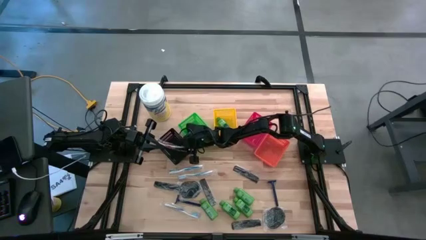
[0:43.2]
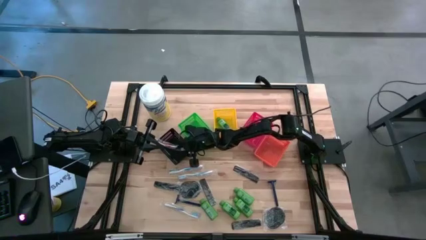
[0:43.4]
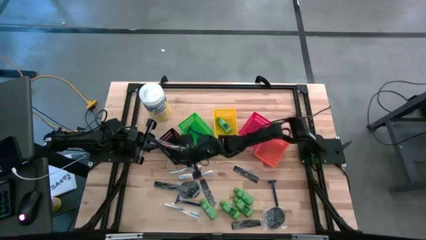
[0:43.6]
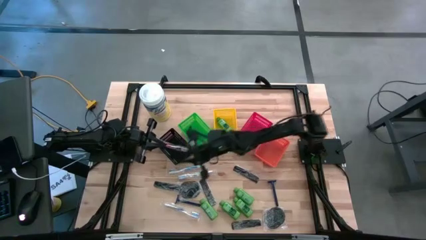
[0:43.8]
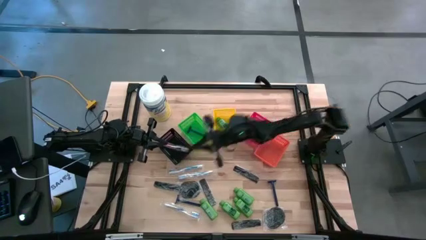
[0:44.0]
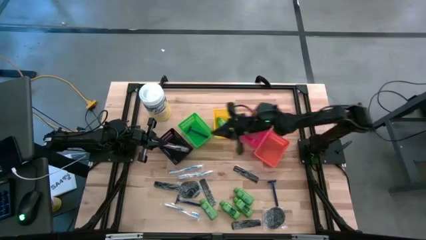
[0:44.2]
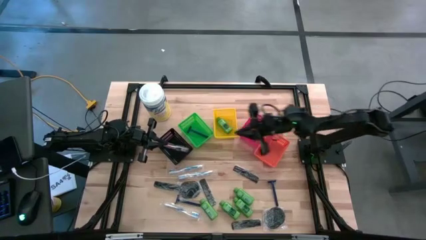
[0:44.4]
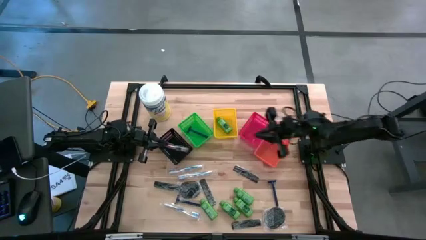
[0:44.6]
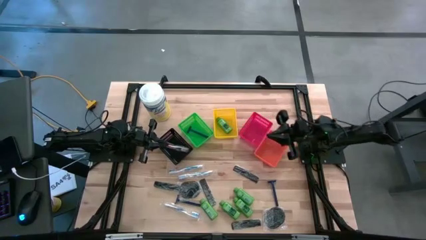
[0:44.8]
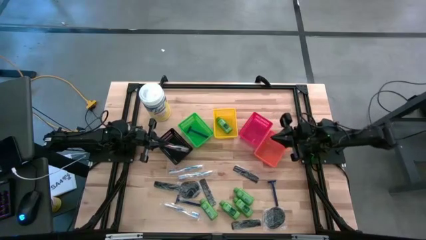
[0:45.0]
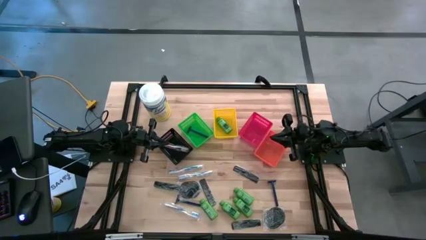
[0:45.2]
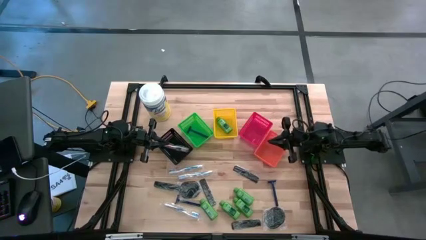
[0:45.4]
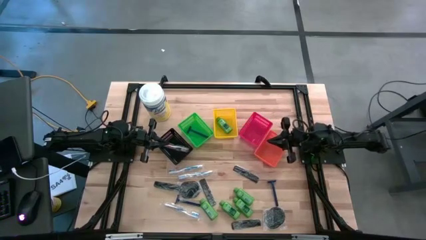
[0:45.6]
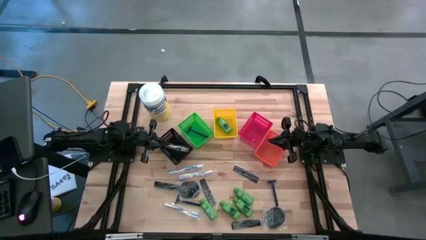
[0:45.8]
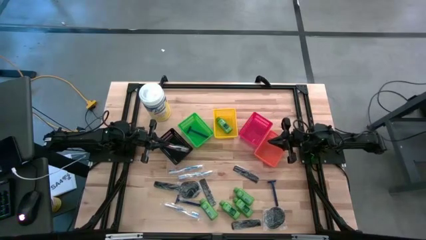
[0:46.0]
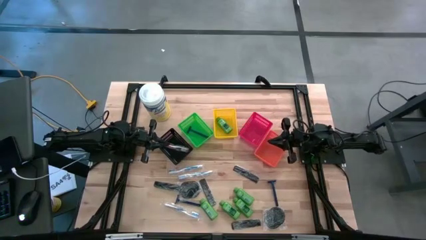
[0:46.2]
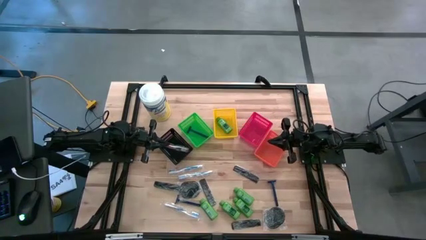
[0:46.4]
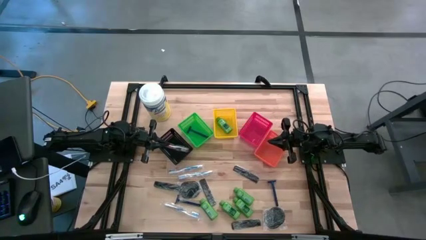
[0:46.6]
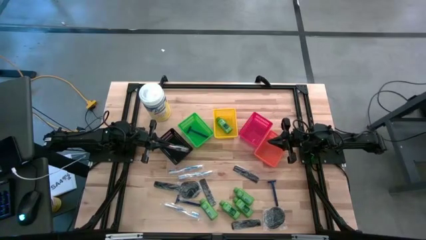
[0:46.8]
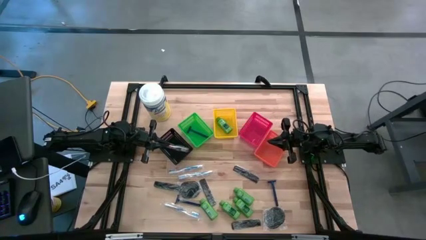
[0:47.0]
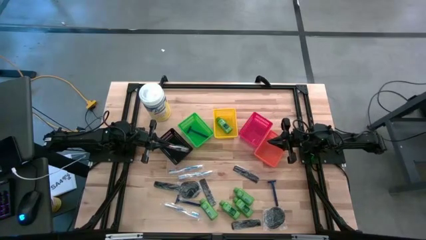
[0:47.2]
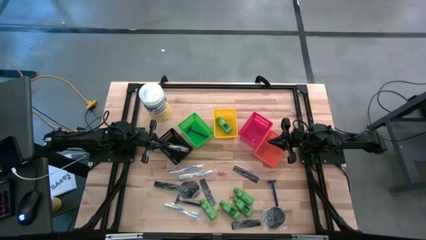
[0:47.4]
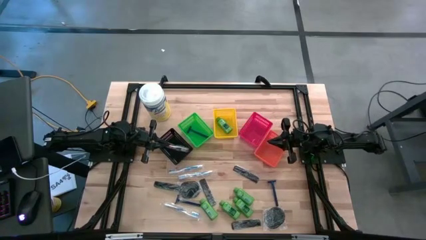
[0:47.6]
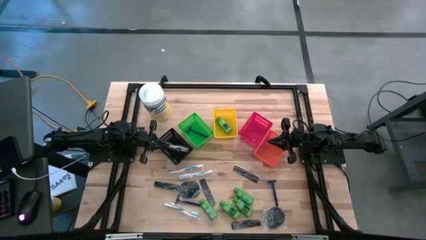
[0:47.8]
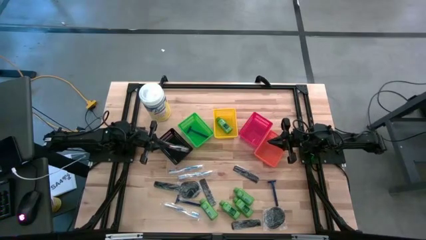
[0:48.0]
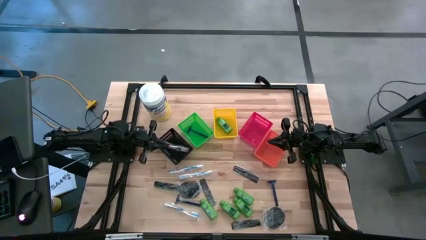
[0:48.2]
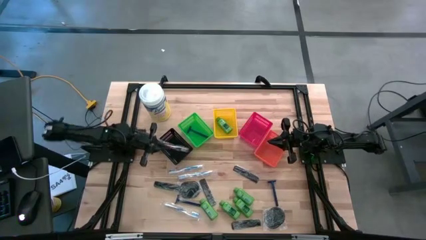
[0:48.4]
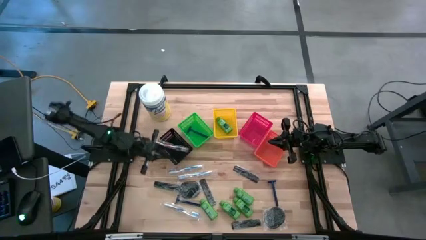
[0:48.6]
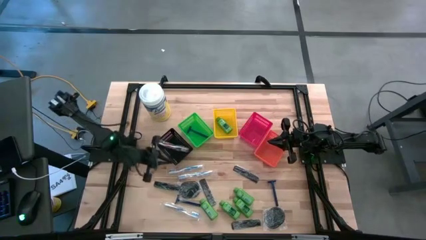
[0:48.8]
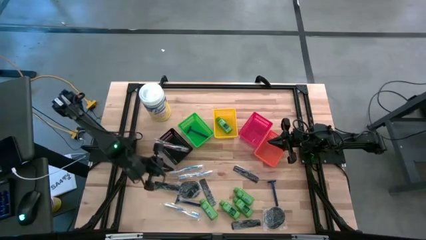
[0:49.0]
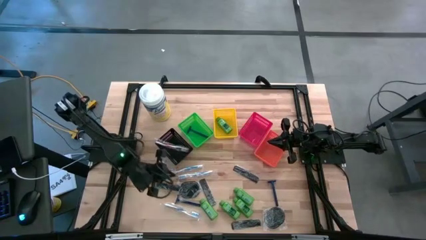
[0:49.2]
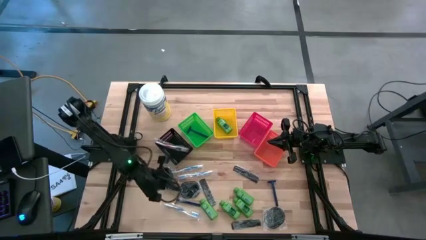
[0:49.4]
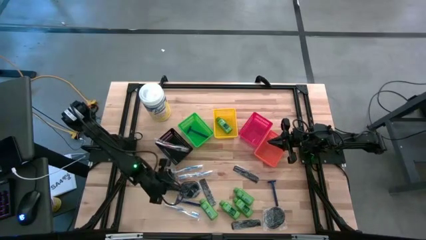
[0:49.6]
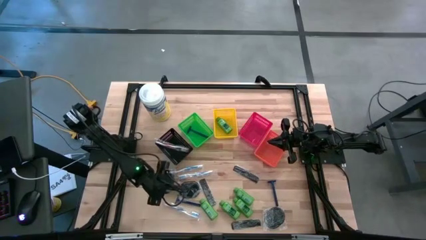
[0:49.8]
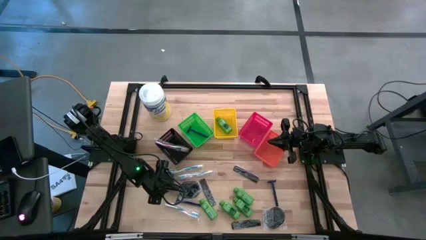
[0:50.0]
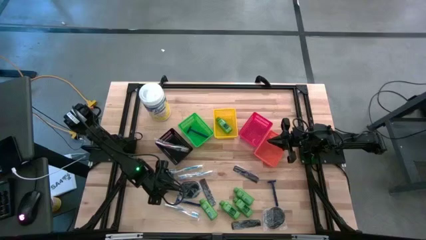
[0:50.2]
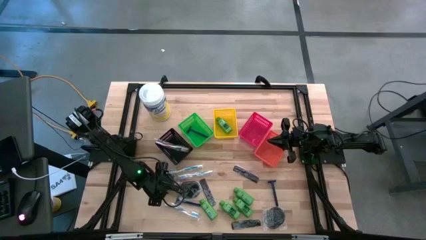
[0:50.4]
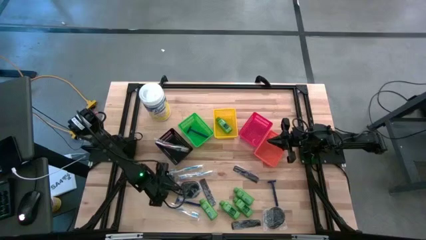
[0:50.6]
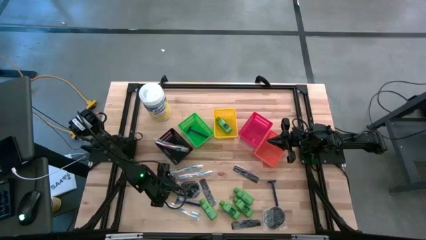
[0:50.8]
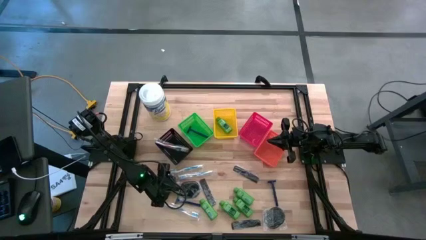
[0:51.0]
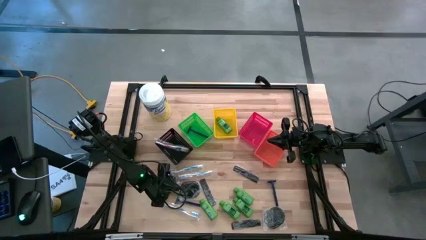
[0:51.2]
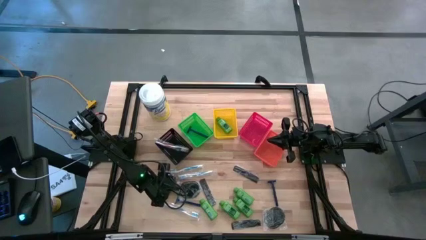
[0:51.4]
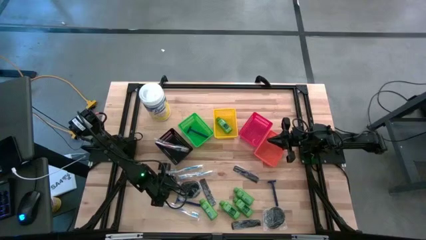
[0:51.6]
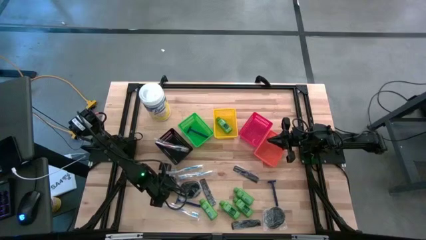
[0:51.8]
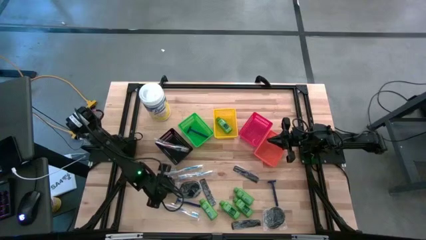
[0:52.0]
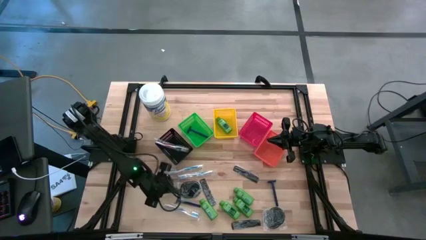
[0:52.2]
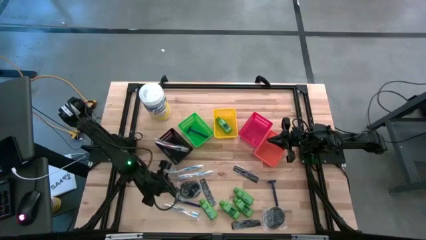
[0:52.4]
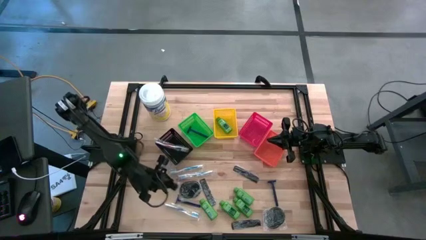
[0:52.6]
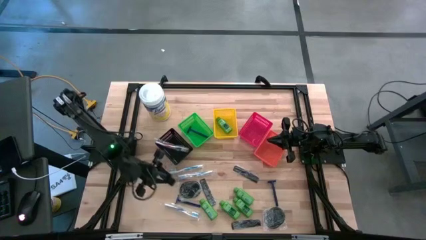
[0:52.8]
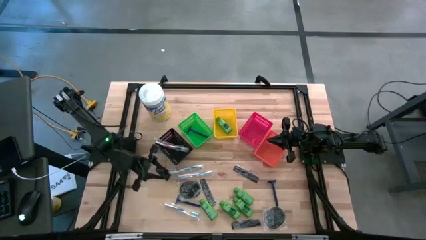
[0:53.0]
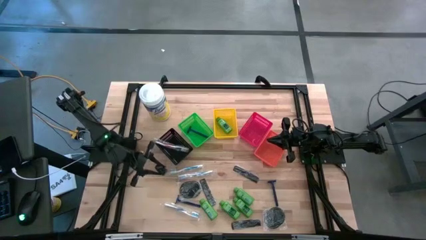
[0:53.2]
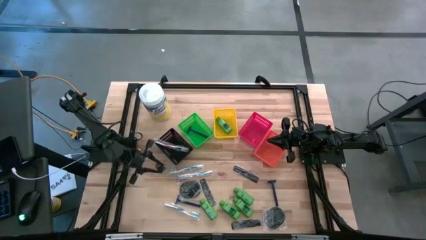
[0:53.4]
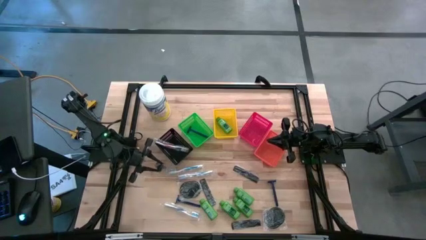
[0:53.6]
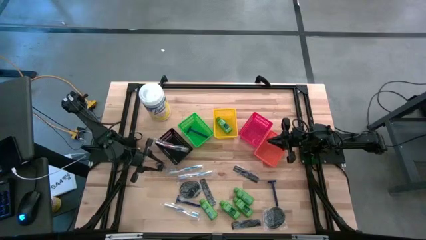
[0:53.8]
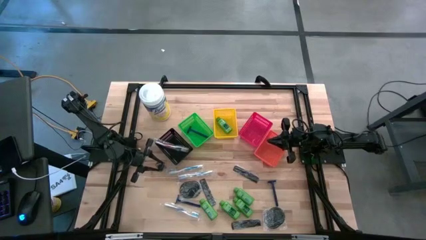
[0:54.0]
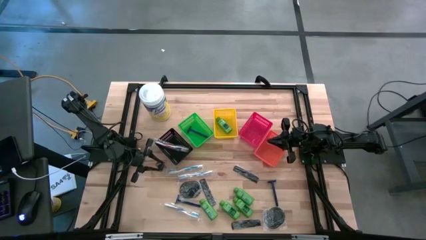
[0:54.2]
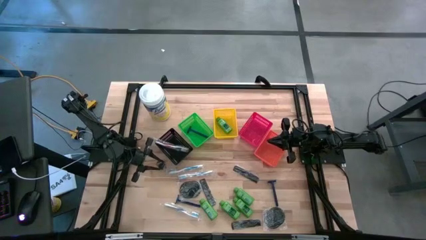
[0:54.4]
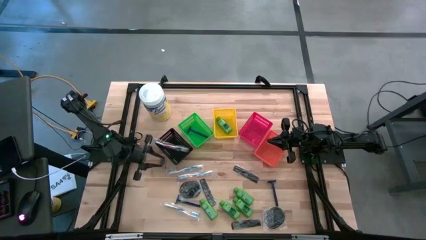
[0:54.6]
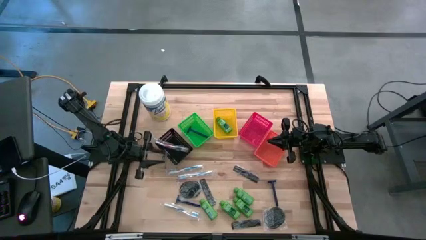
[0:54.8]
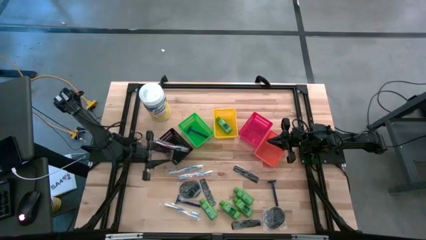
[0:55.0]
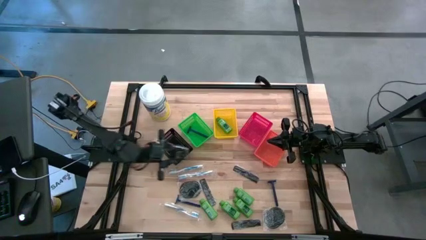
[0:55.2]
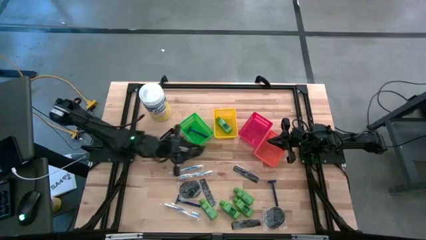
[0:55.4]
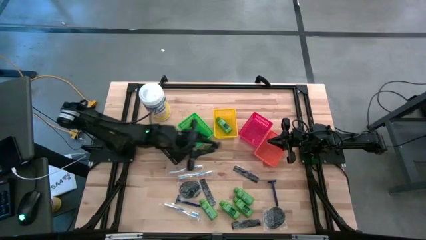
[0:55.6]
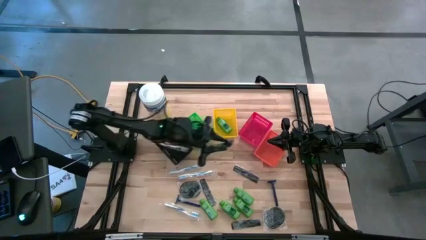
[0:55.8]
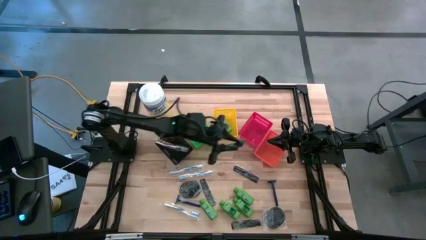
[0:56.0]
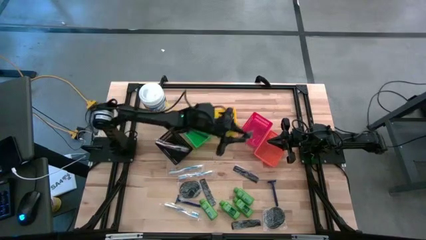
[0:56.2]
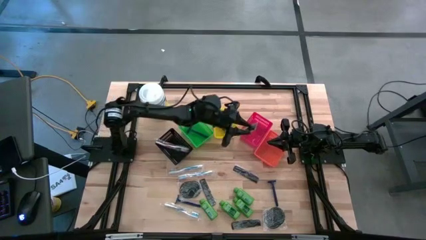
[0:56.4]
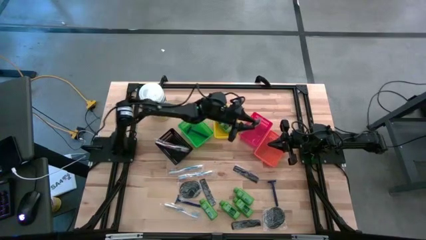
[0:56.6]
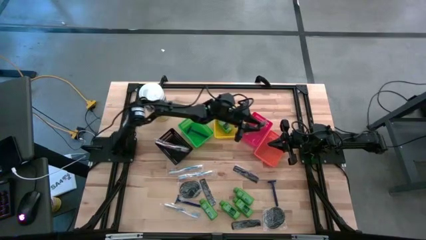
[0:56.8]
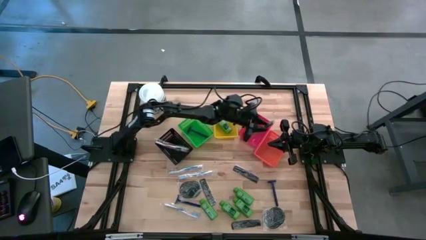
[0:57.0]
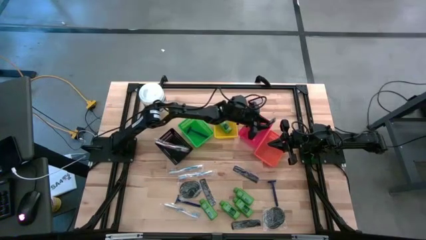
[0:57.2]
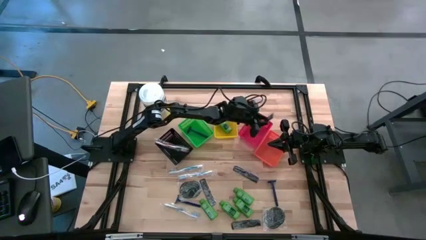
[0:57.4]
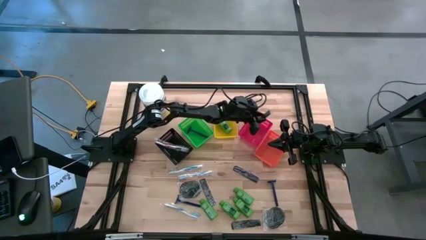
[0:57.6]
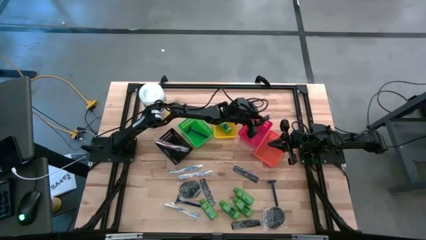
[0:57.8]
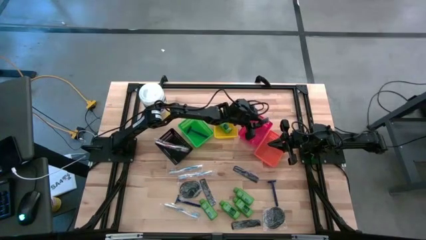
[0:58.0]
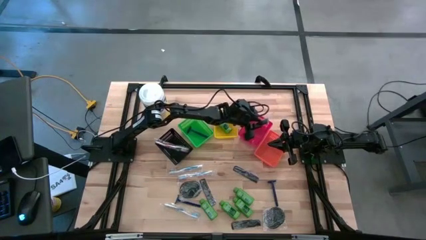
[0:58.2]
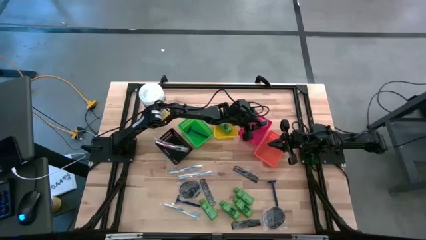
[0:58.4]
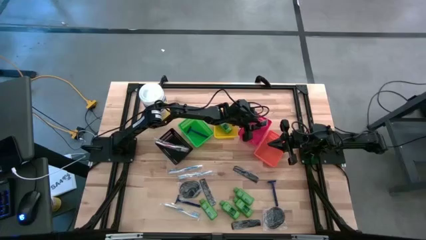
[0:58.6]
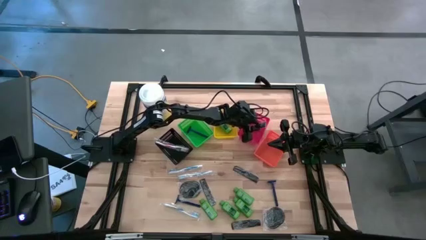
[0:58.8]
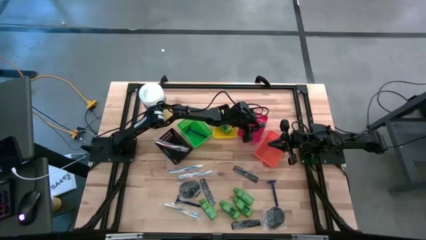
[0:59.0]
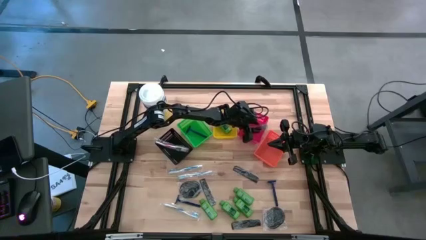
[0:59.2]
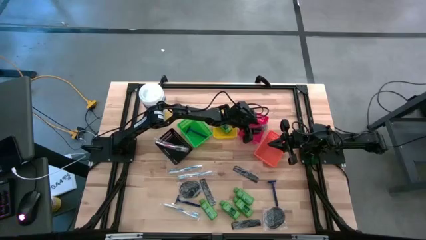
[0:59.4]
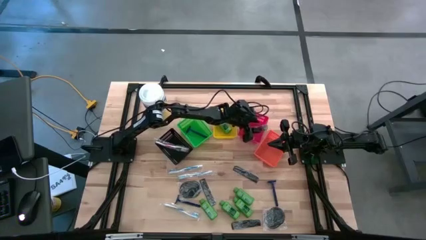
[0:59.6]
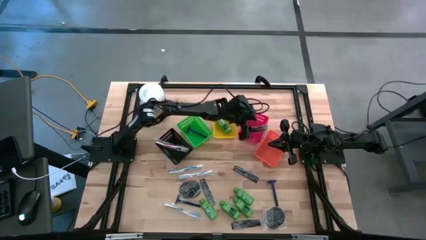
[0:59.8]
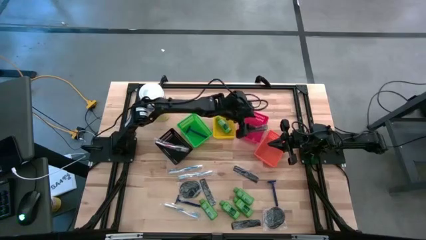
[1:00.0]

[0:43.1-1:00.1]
Task: Pick & Place Travel size toiletries
Put the left black hair comb into the red bin
